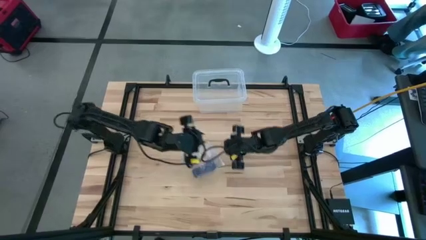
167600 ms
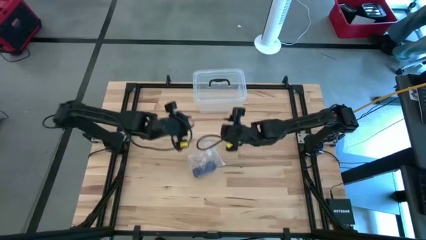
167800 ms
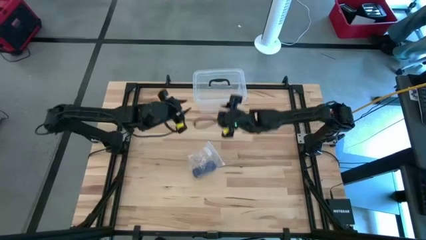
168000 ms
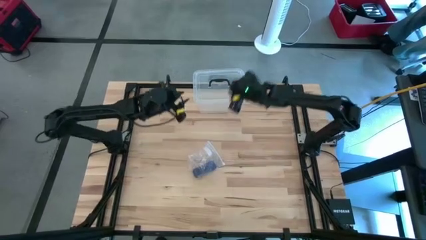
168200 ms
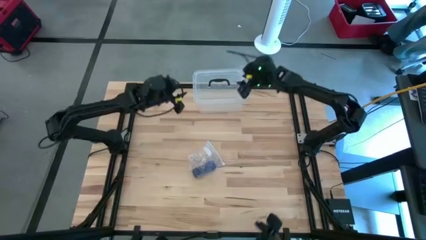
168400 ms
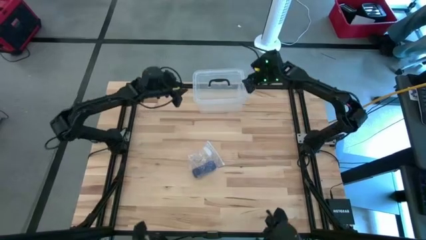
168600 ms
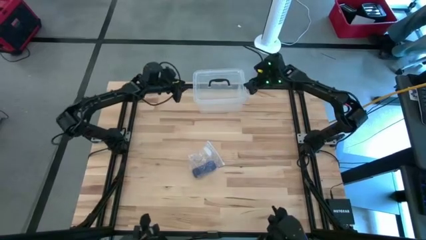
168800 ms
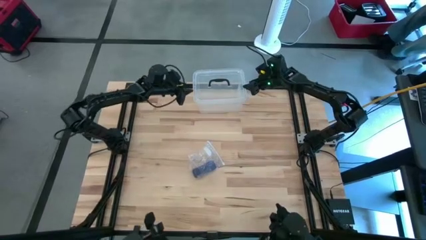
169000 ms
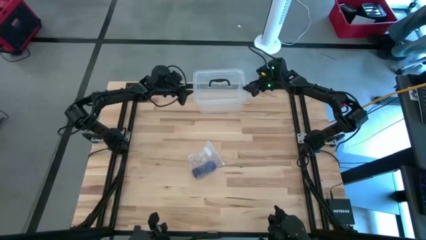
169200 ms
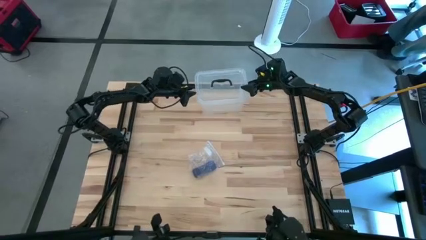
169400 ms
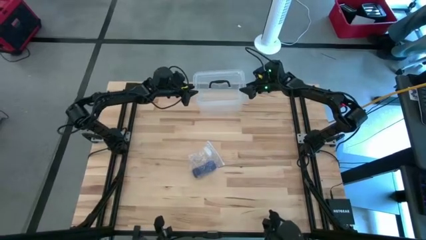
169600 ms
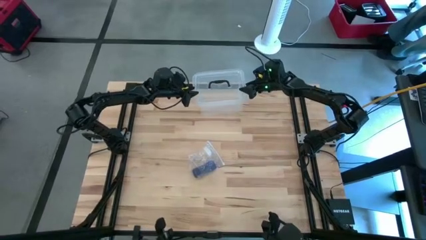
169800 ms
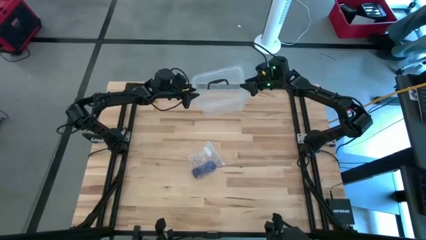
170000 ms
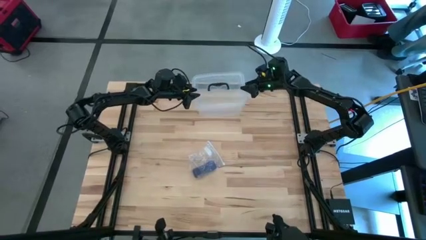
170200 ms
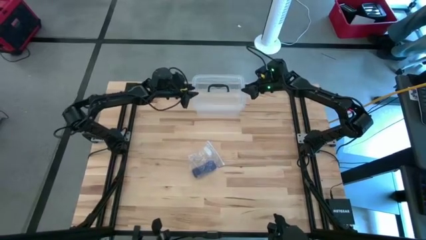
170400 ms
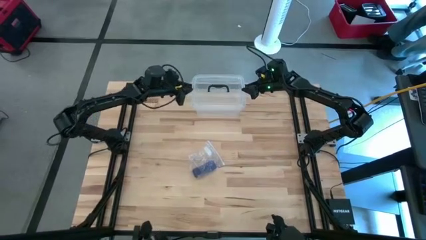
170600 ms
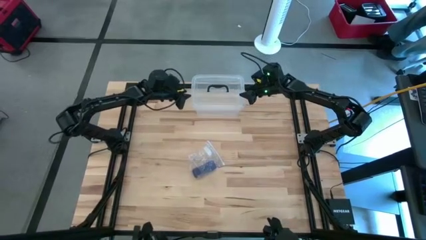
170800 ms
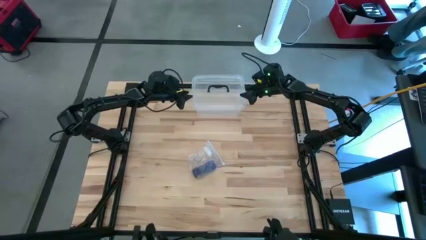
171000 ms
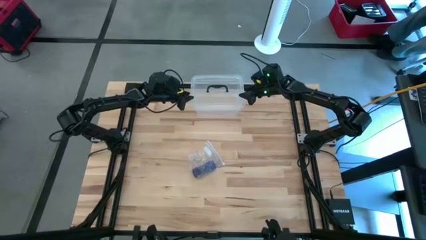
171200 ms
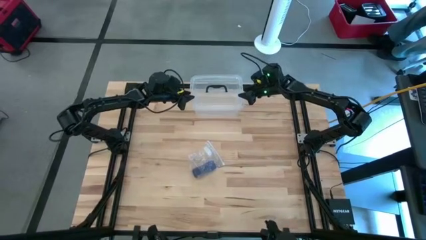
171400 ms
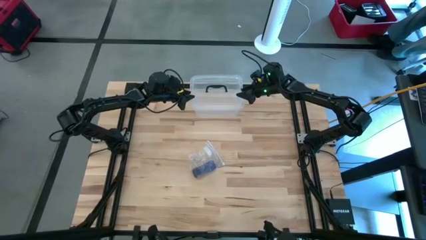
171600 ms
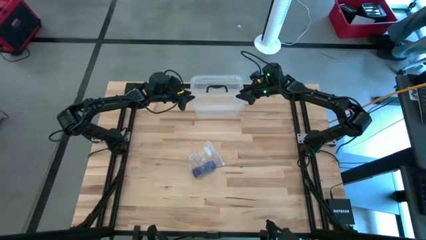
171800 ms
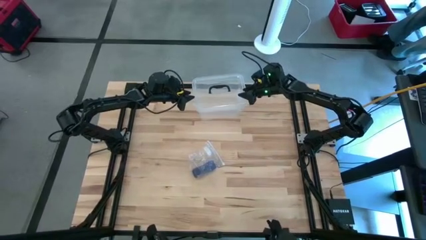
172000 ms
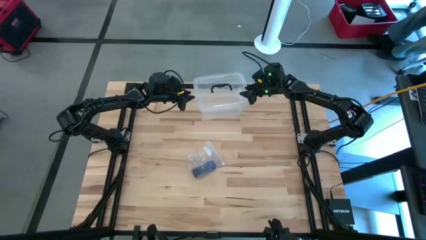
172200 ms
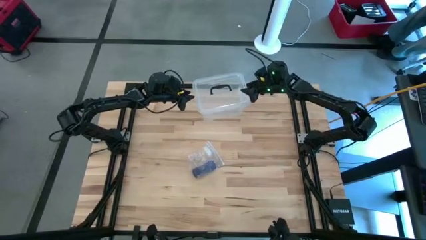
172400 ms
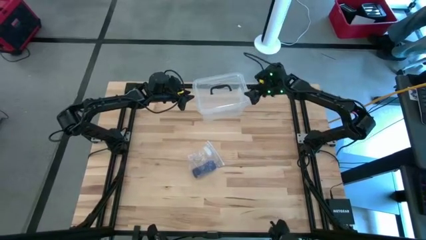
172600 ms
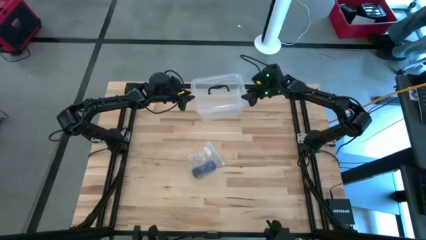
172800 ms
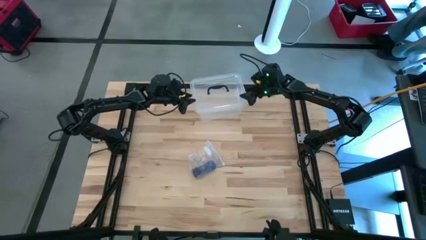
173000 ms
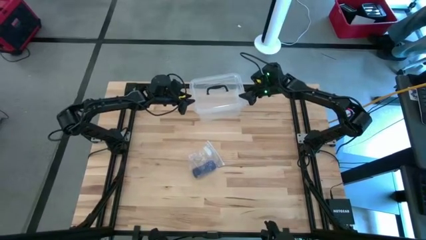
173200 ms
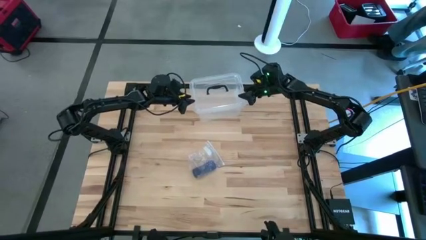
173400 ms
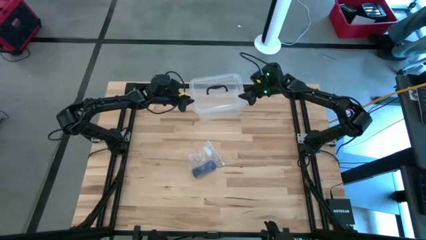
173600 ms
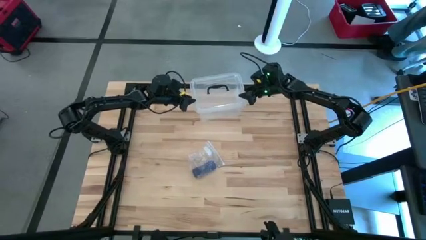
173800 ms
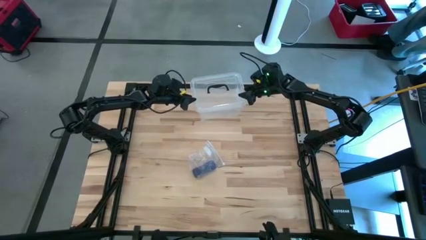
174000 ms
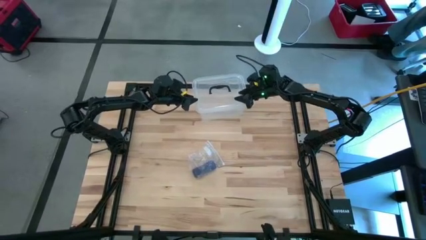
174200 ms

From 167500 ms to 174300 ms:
Task: Roll bandage
Open the transparent tupperware

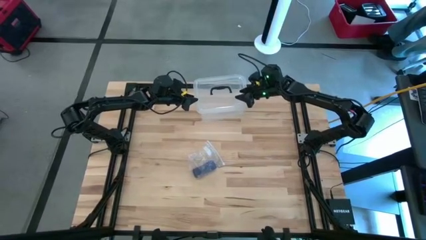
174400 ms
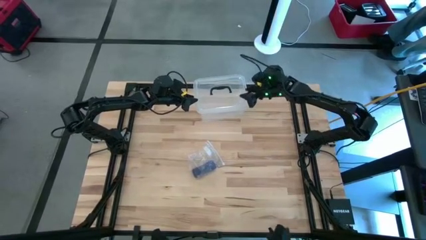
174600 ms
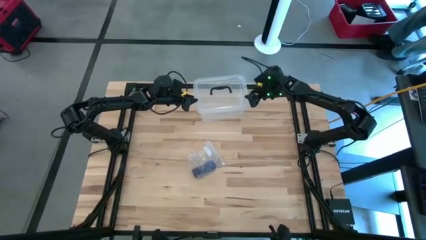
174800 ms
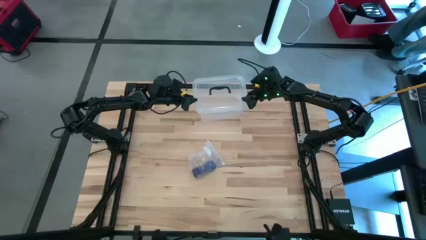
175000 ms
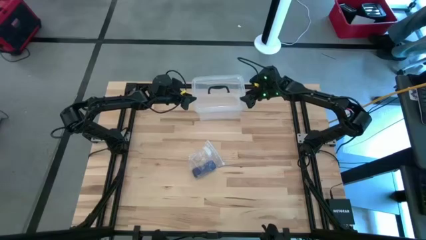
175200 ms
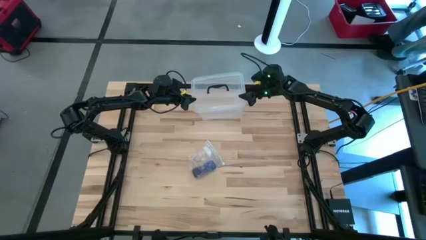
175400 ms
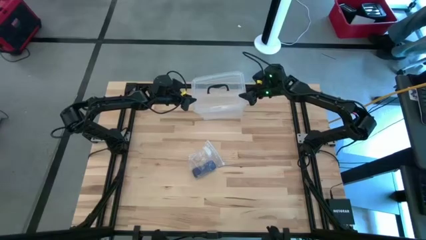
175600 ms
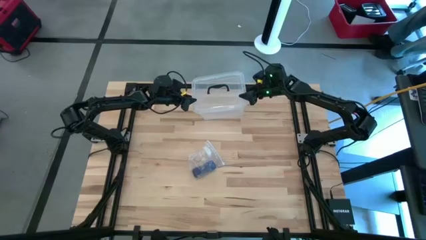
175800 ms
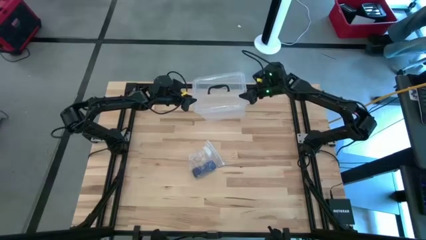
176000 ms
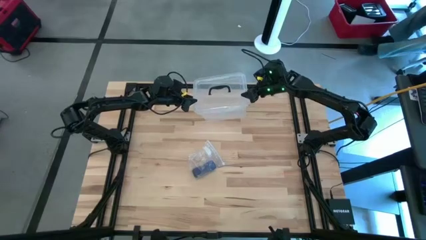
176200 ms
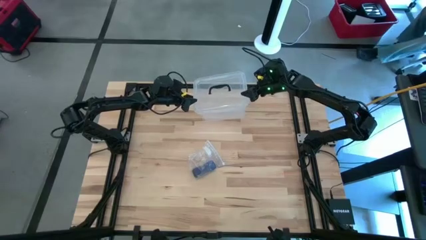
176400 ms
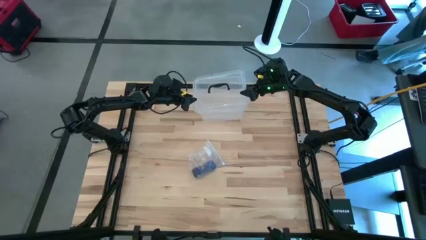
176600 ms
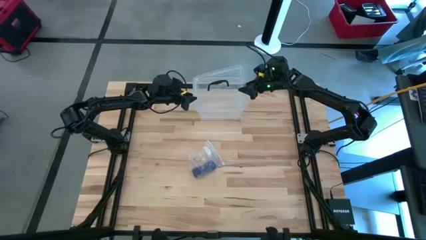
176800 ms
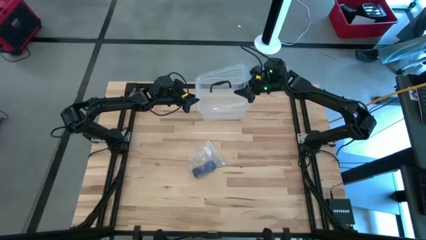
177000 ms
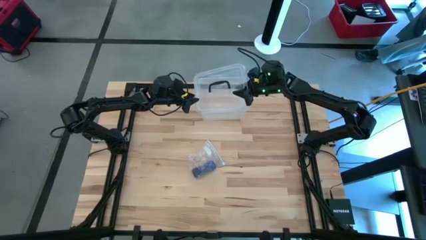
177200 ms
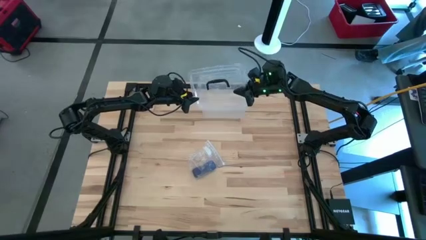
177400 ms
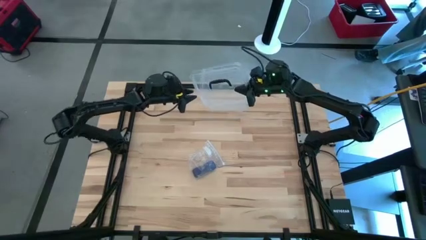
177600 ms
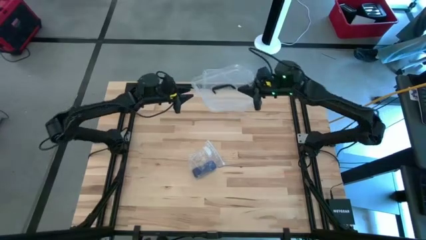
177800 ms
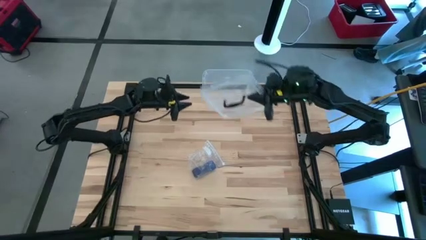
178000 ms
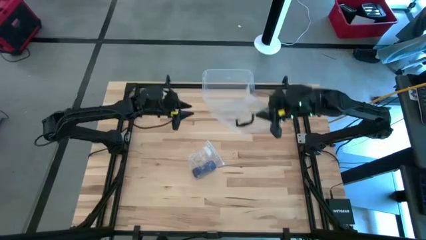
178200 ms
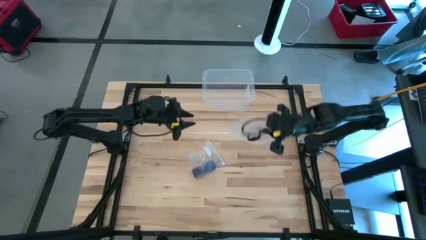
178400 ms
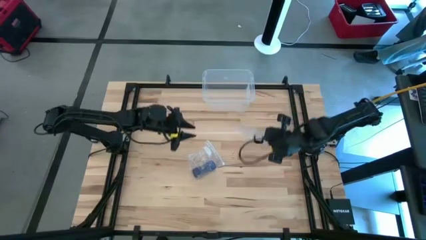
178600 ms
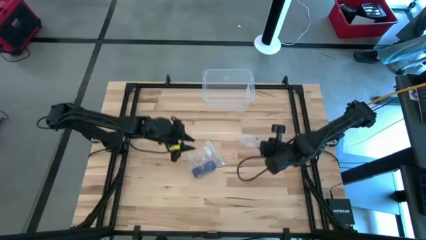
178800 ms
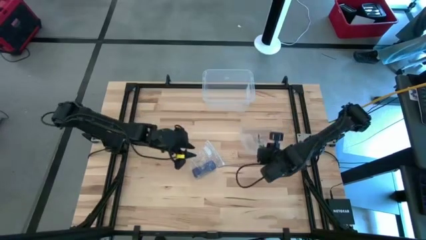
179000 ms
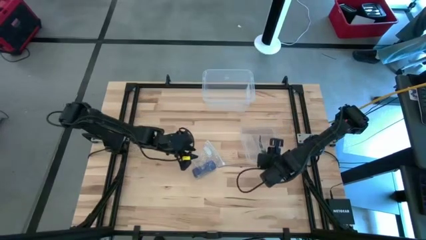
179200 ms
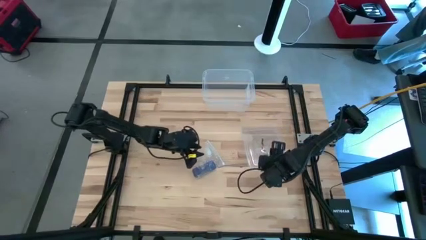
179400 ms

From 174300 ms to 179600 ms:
Open the transparent tupperware

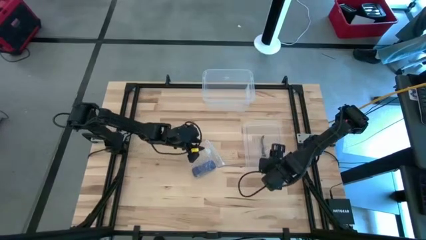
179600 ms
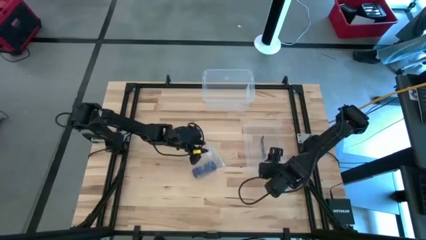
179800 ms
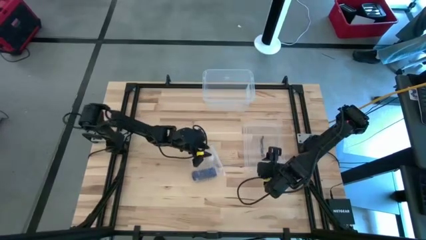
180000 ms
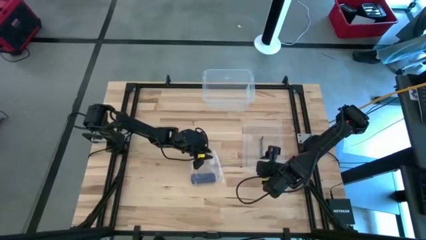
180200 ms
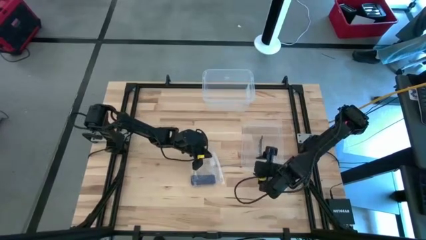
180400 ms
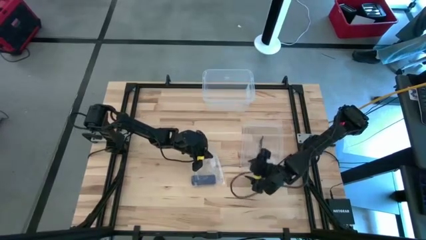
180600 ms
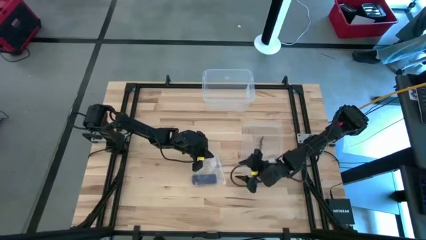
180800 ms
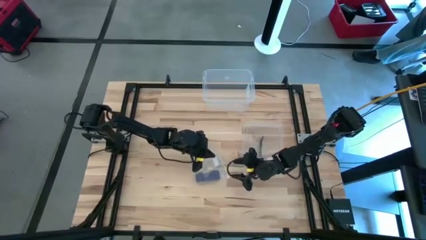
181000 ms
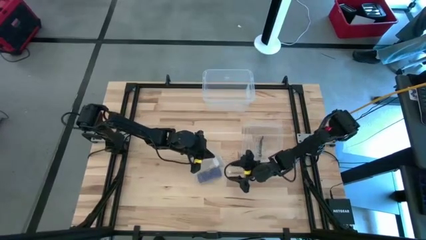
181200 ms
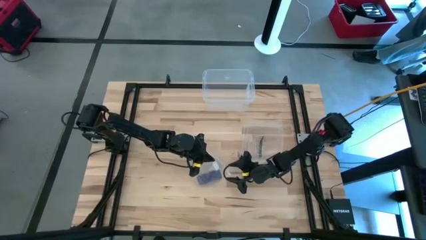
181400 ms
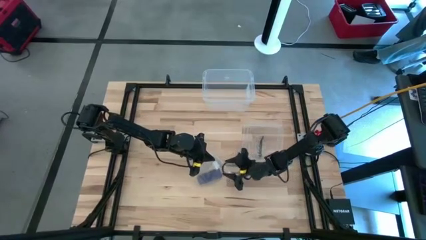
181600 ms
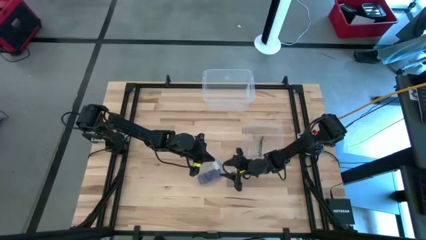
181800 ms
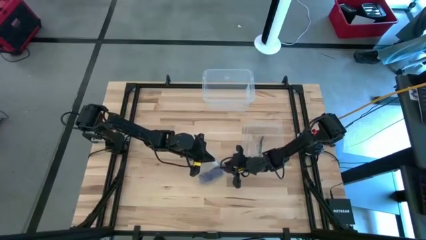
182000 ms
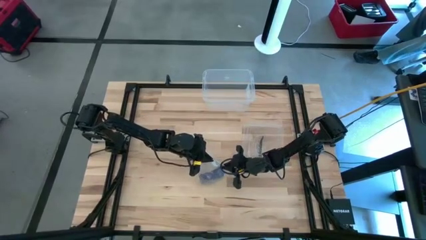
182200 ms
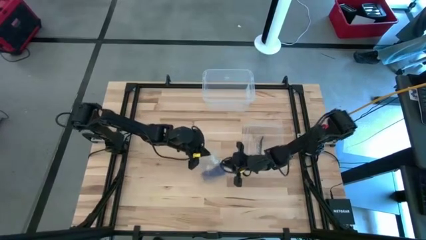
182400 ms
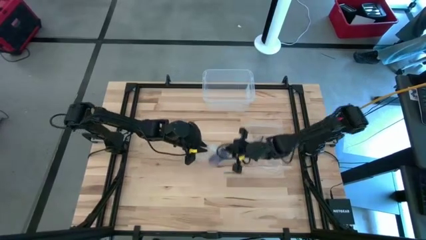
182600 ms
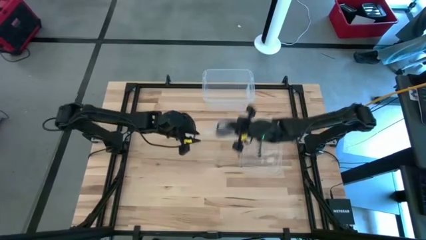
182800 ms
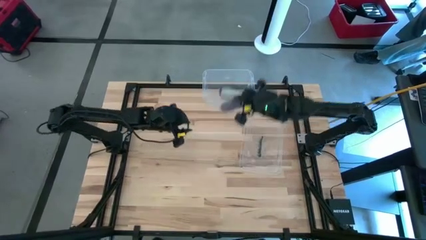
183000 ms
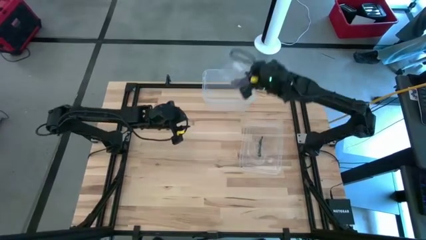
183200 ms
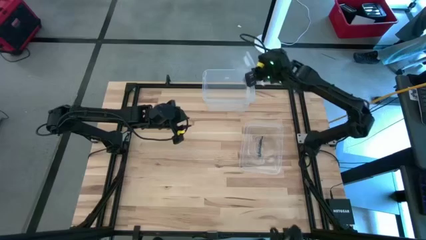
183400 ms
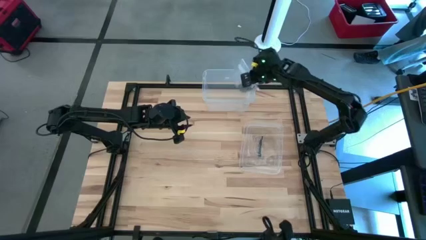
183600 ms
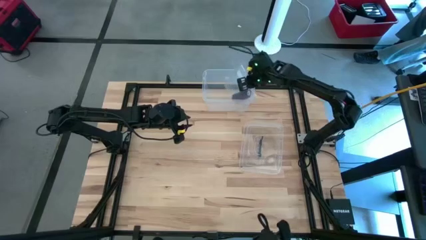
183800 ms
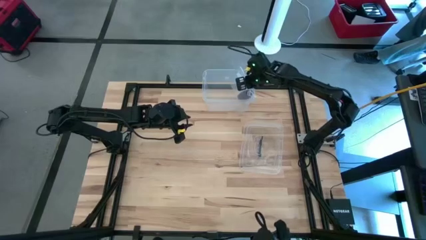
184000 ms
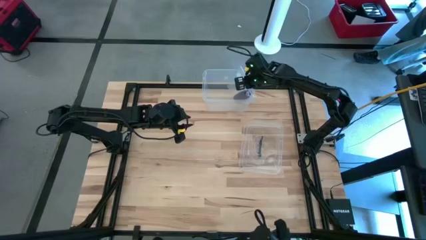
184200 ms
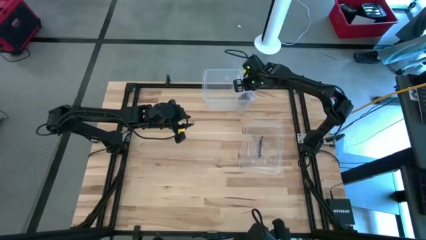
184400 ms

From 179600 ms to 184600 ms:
Put the packed rolled violet bandage into the transparent tupperware
